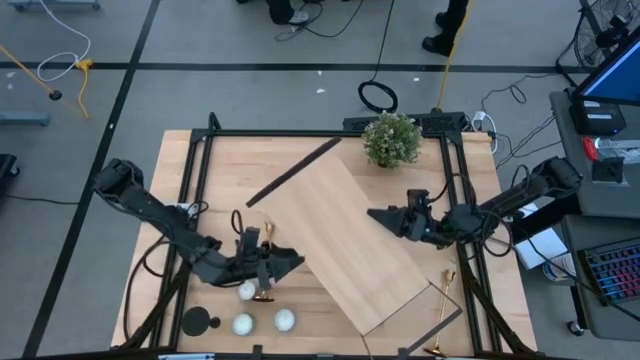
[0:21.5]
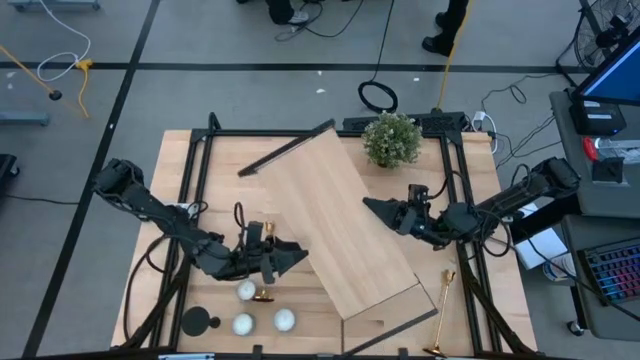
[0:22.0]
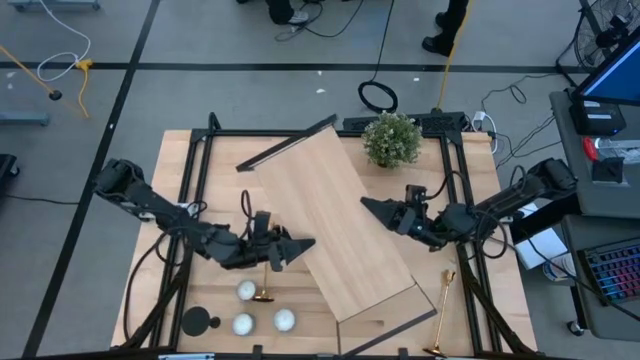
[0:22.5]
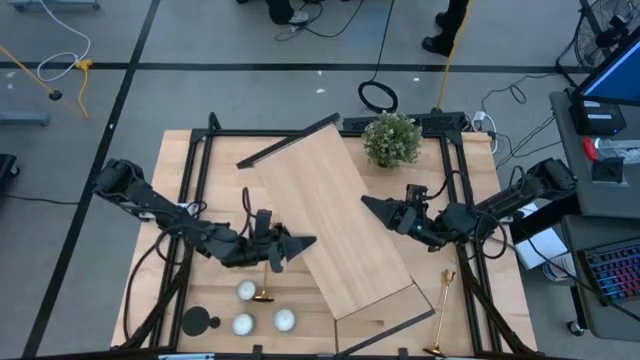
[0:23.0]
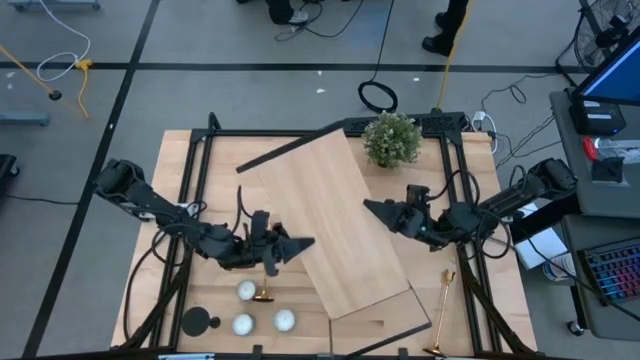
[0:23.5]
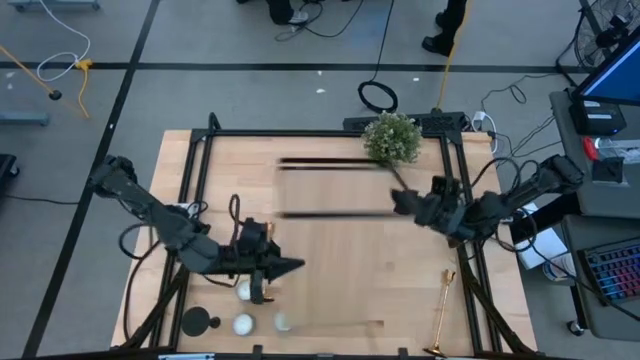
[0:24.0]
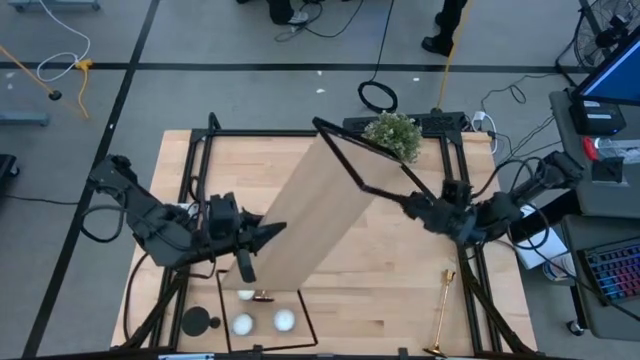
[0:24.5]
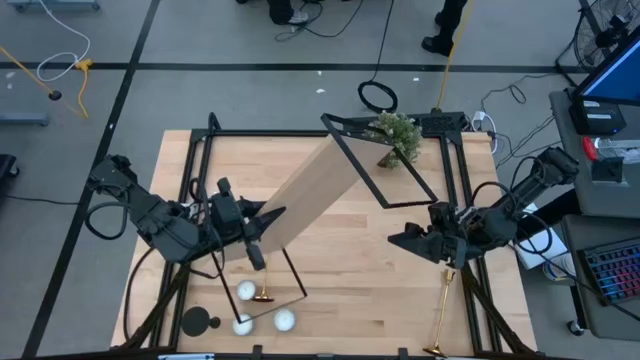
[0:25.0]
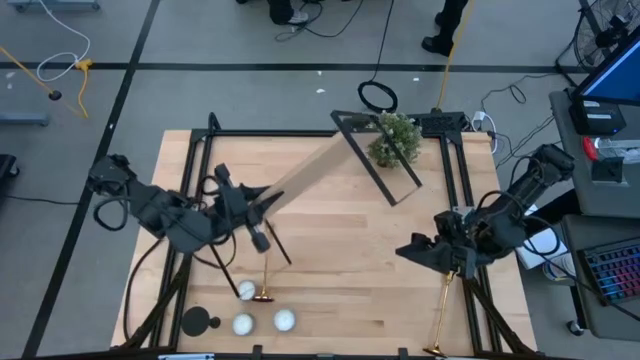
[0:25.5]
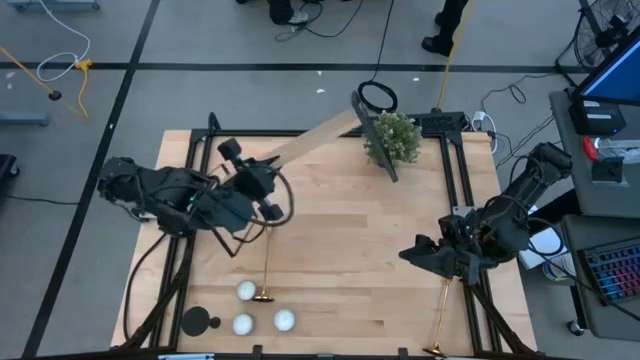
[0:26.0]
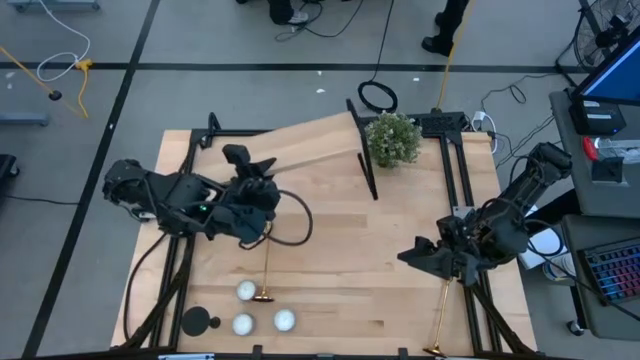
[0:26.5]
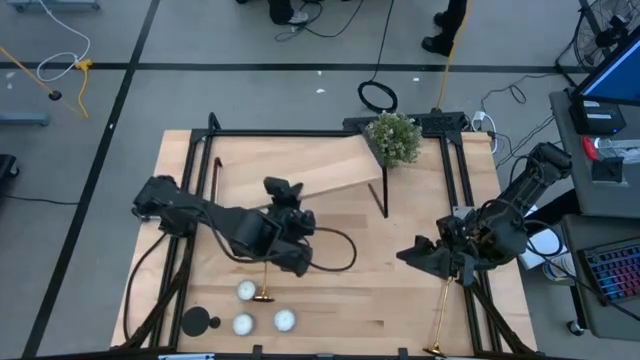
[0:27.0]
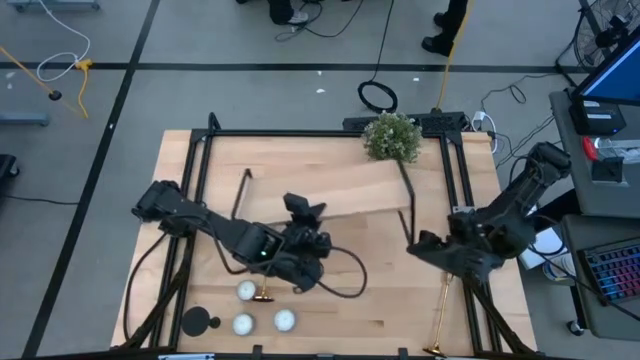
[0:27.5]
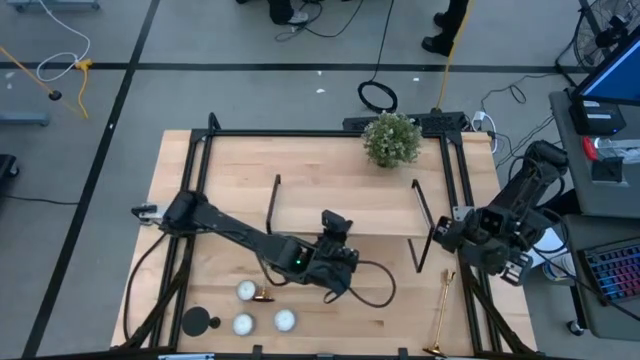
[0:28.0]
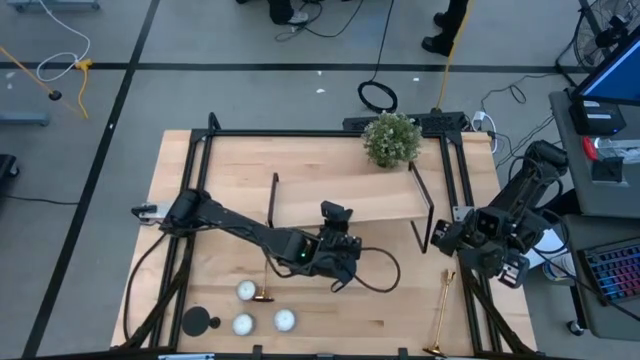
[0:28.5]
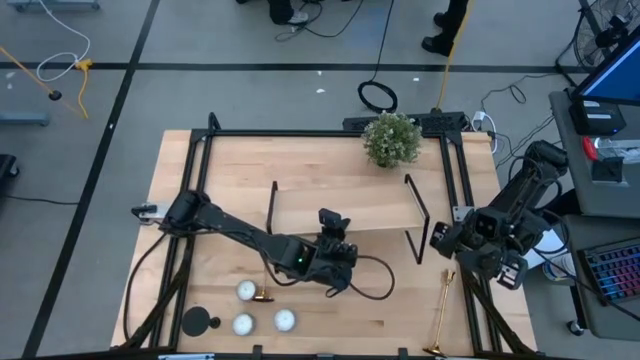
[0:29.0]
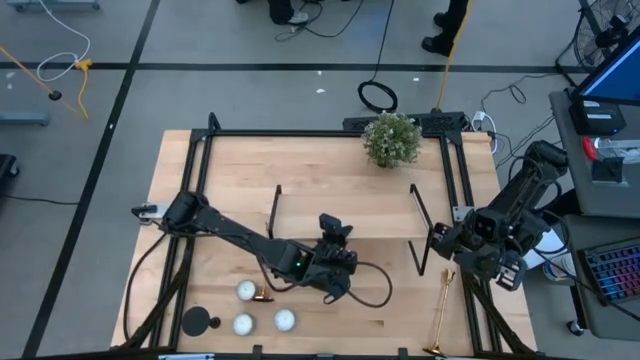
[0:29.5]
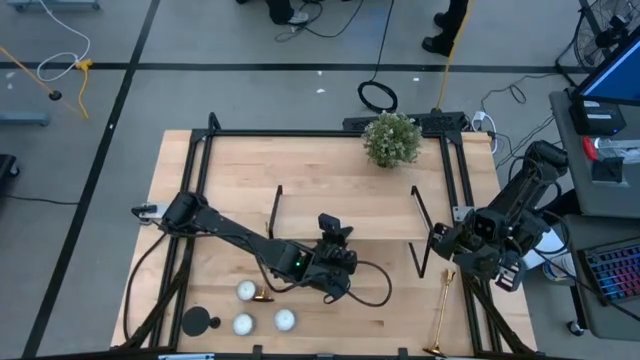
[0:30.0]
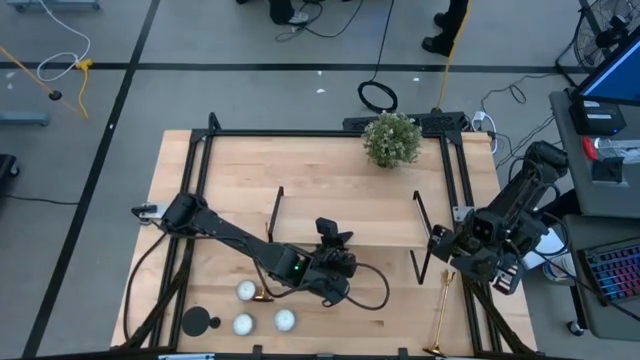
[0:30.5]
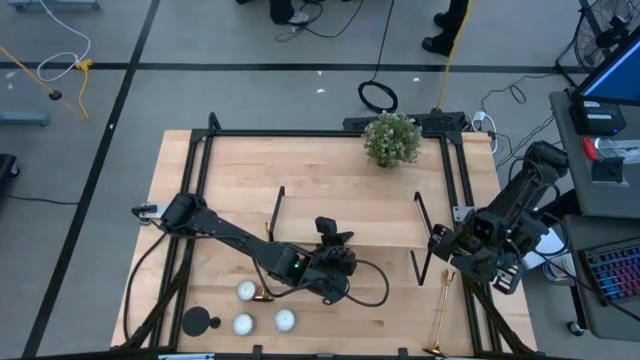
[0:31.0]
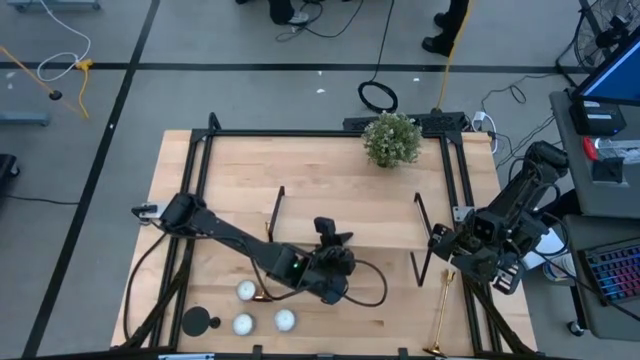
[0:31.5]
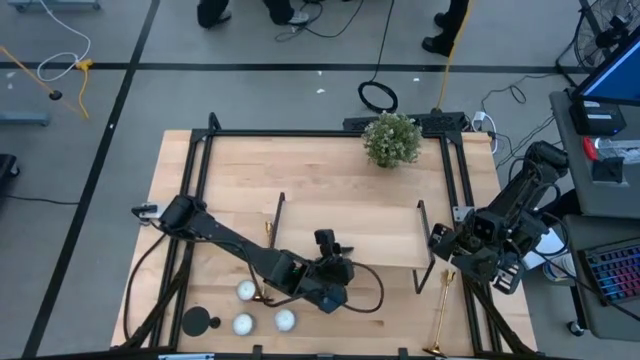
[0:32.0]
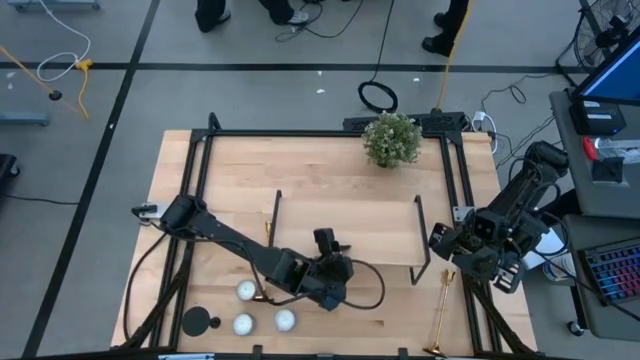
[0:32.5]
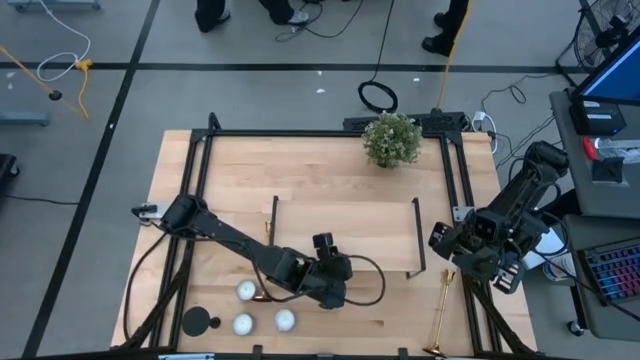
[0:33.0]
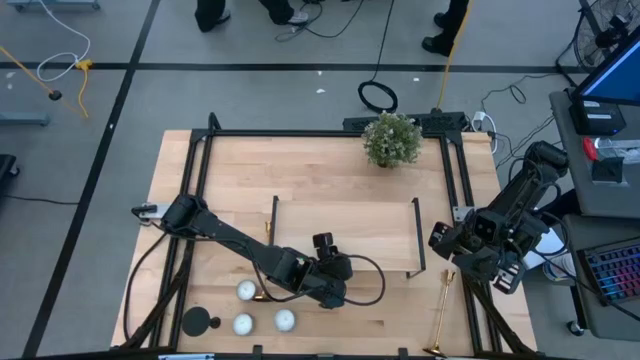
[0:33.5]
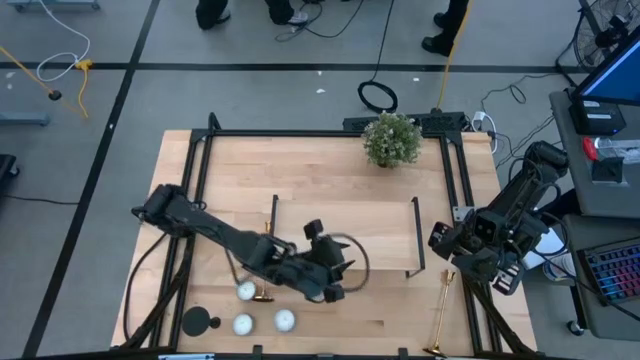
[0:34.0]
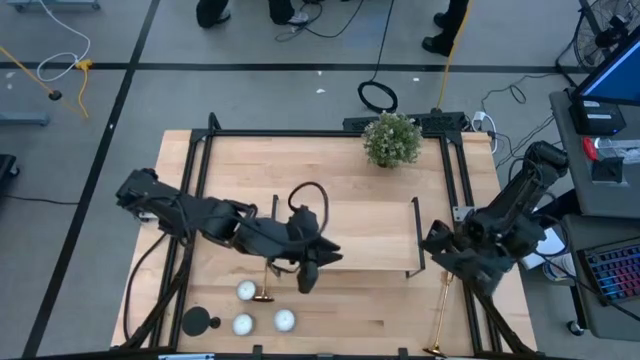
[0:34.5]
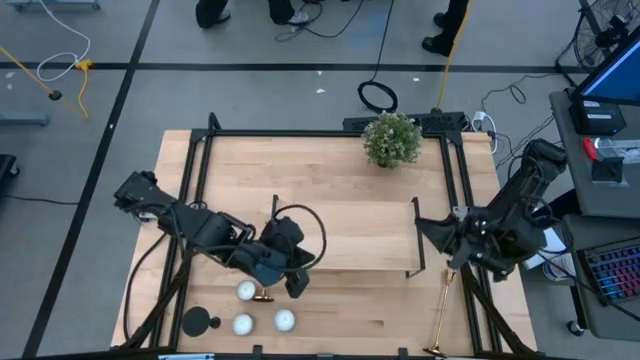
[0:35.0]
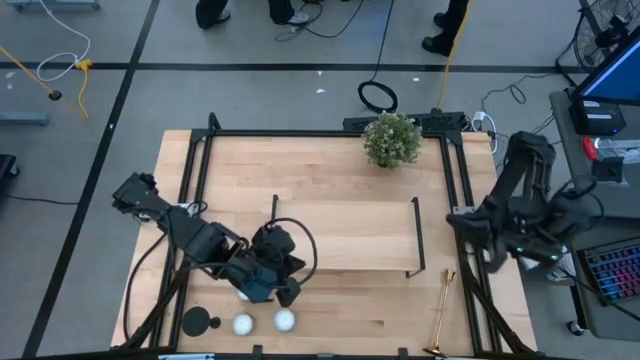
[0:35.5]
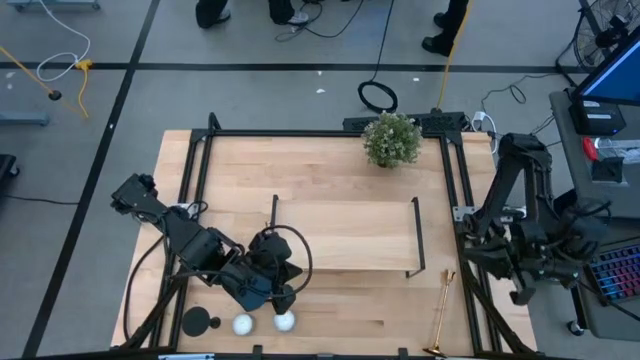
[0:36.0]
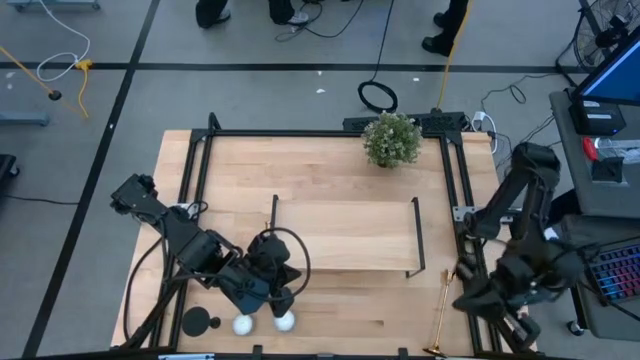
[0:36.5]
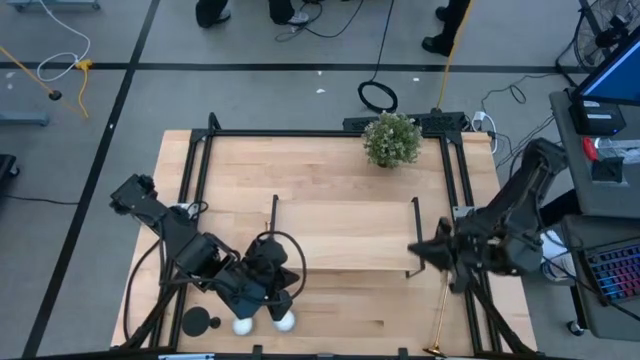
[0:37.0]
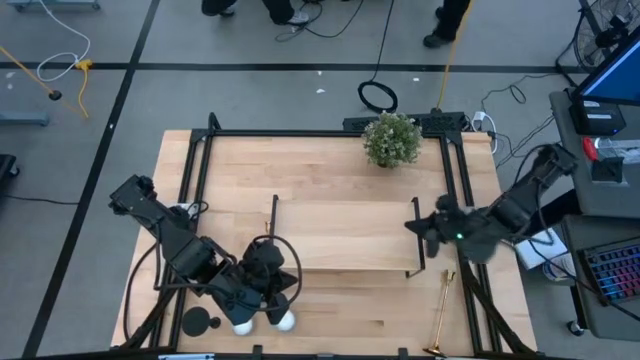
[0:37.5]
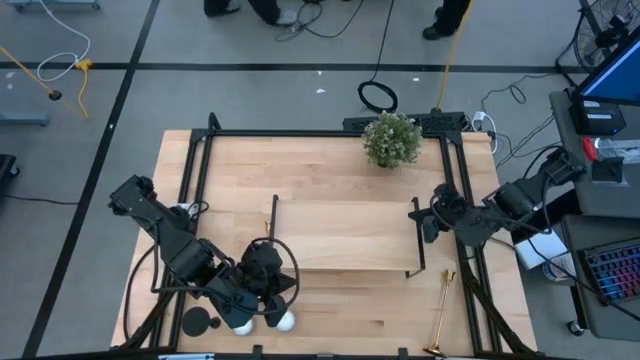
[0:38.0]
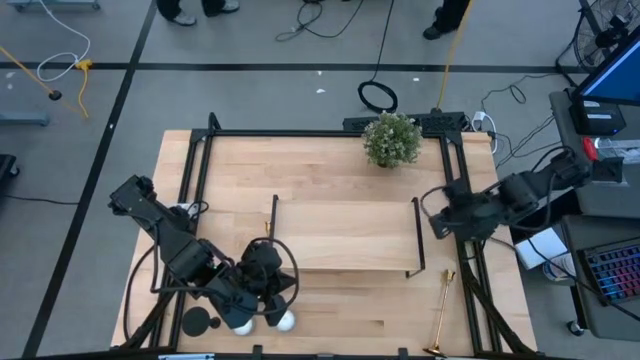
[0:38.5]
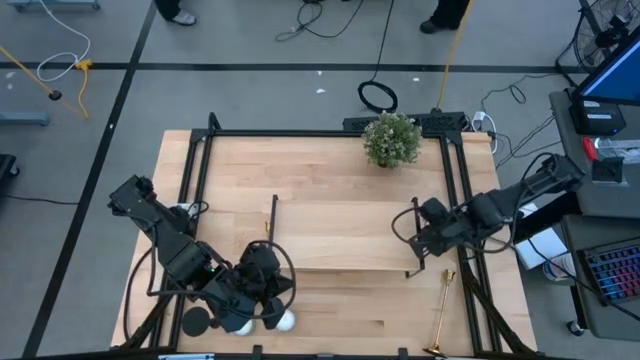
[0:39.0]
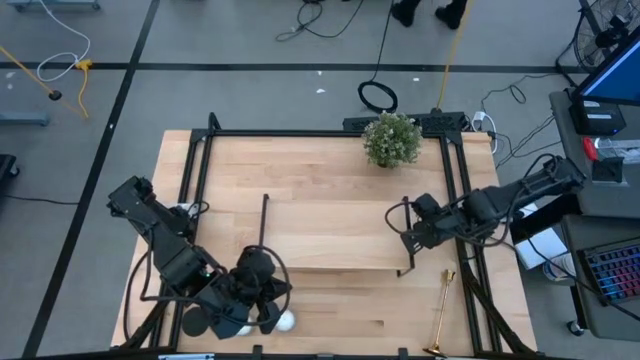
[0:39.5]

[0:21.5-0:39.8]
Task: Pick & Place candle stick holders
Adjust the shelf

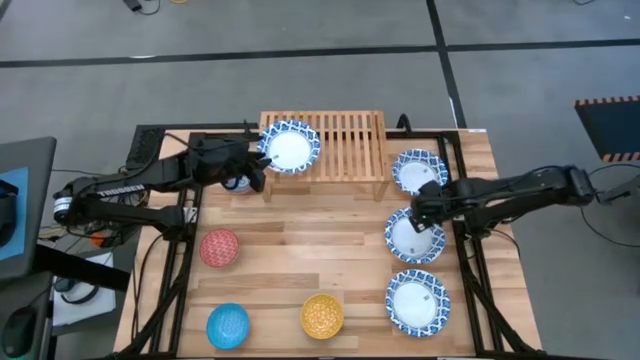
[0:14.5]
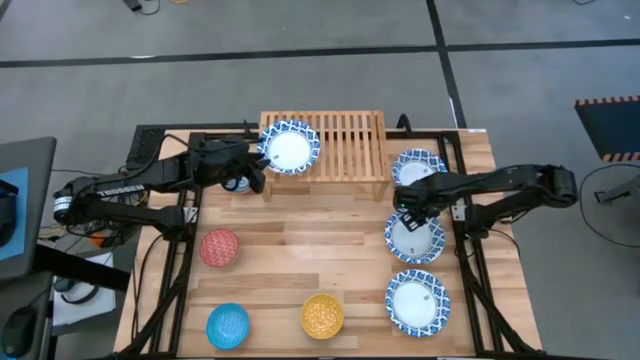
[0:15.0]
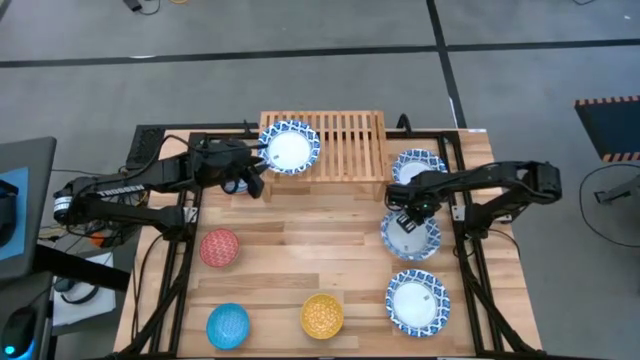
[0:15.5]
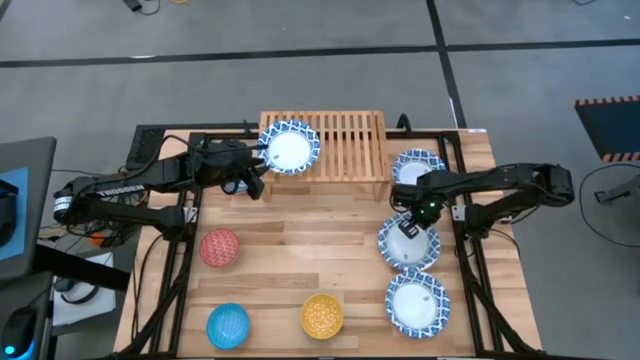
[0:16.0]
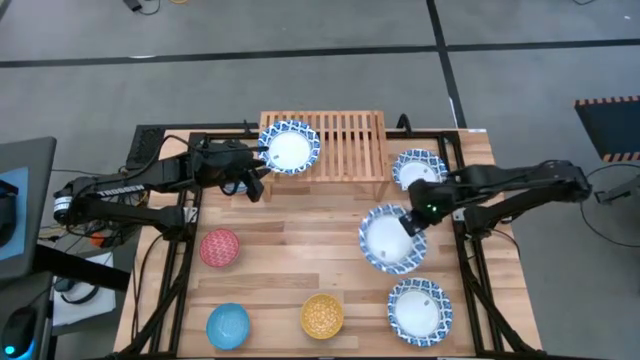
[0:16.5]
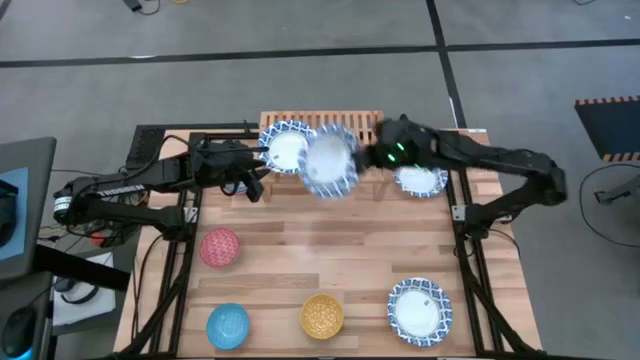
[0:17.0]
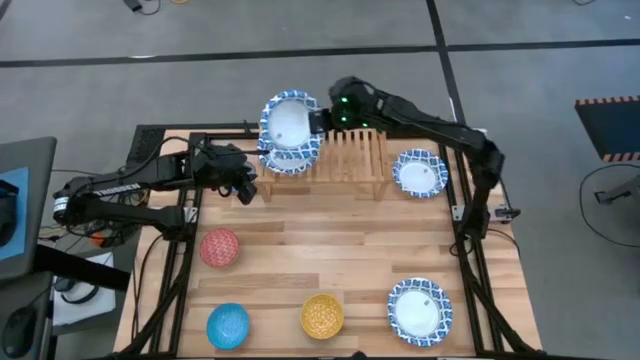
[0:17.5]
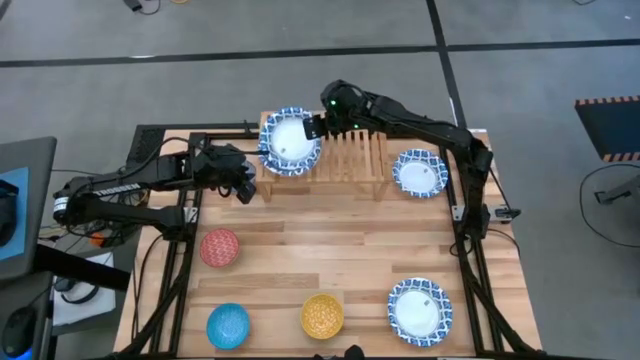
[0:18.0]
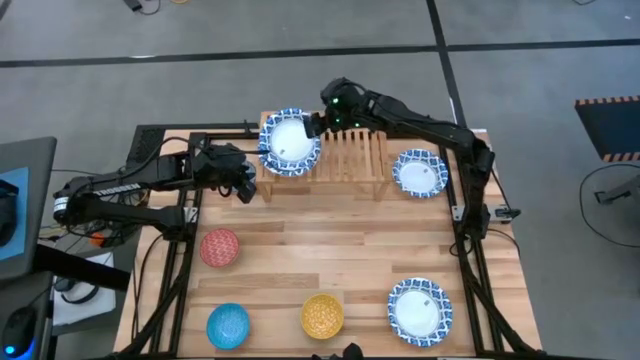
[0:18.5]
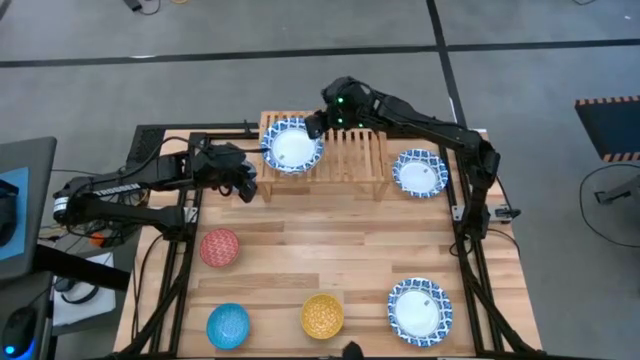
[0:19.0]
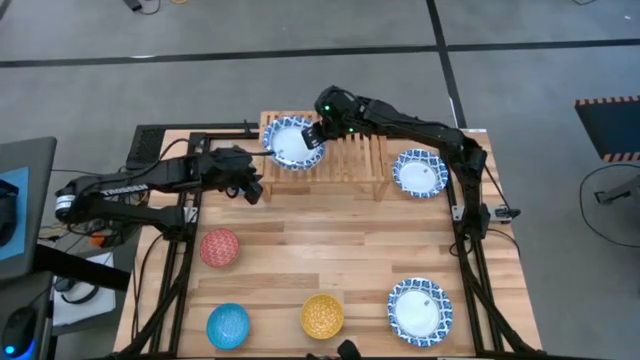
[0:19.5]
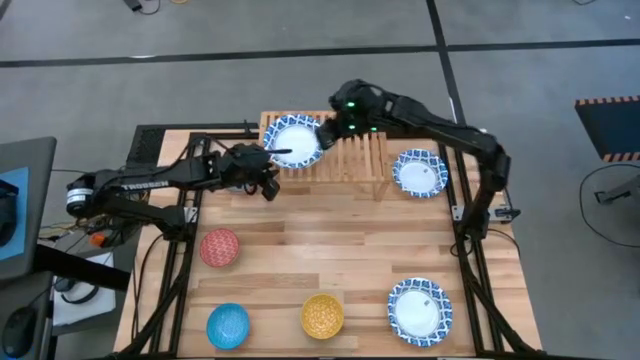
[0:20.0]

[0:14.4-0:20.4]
Task: Place and stack bowls onto a shelf
Stack the white bowl on top of the white bowl on the shelf
